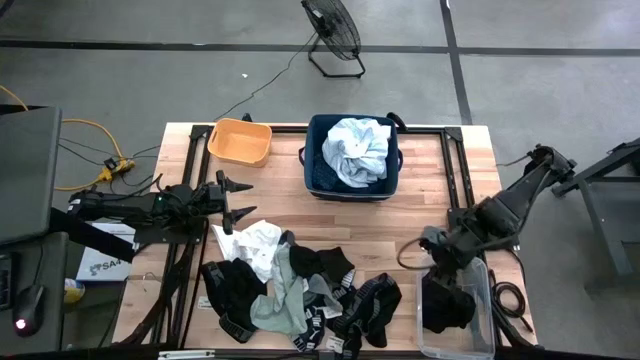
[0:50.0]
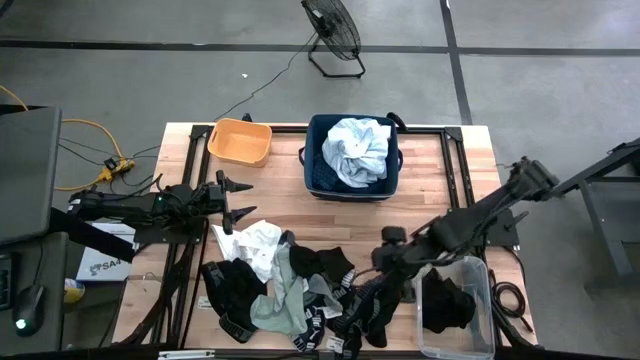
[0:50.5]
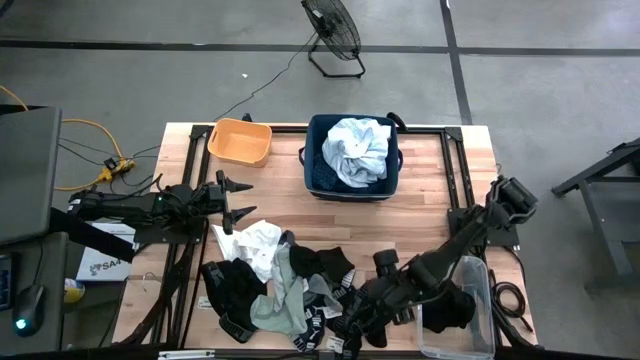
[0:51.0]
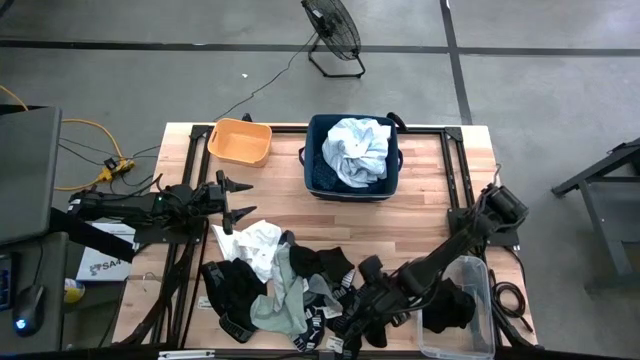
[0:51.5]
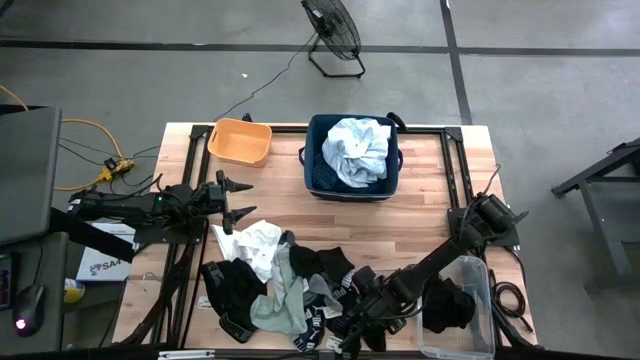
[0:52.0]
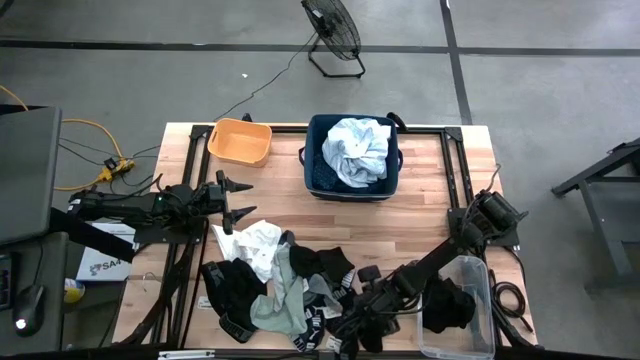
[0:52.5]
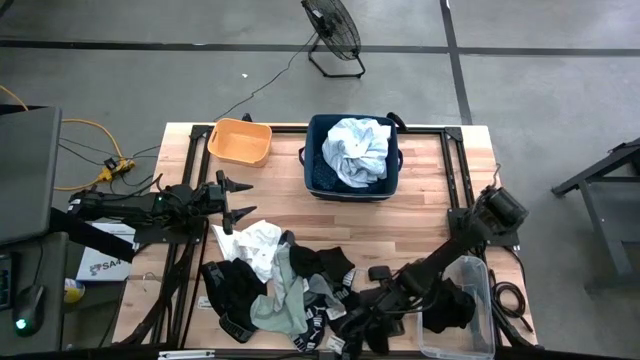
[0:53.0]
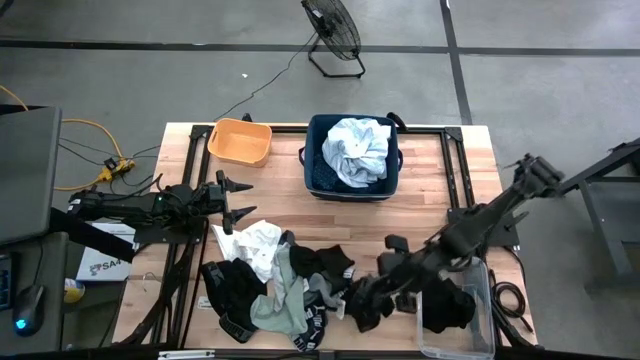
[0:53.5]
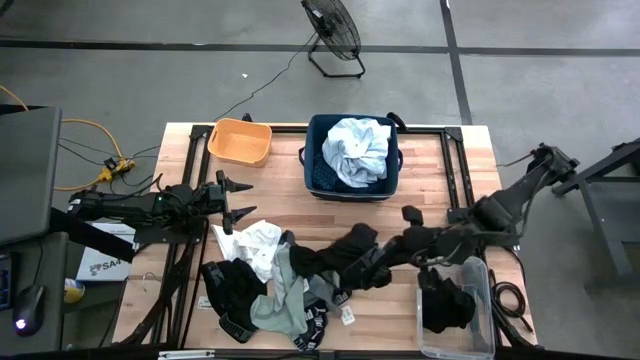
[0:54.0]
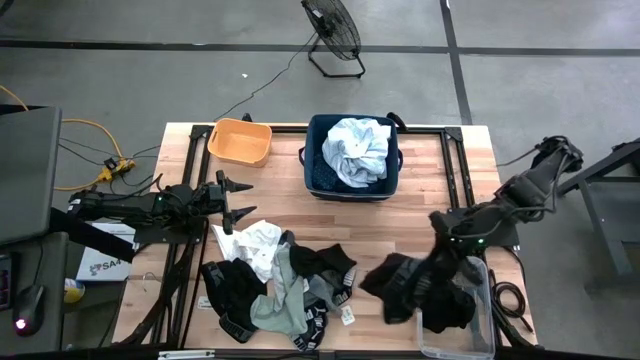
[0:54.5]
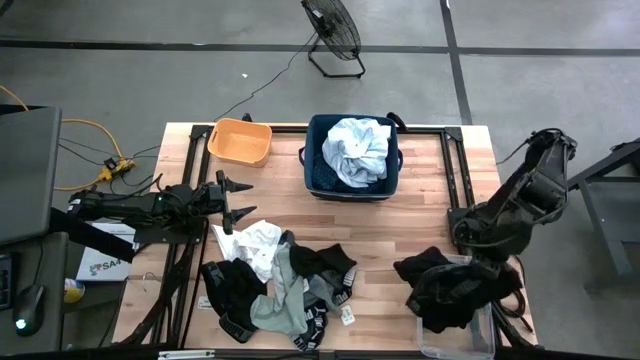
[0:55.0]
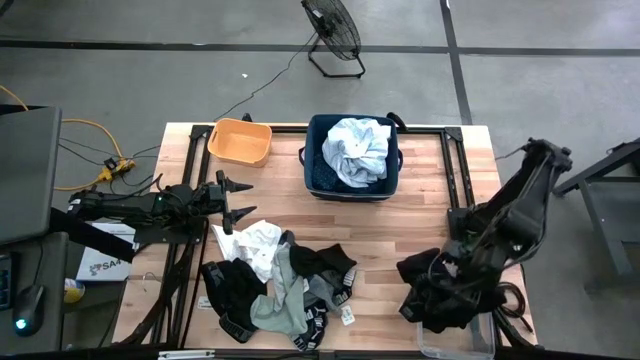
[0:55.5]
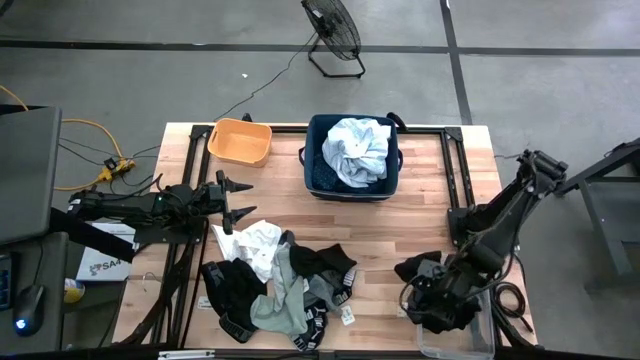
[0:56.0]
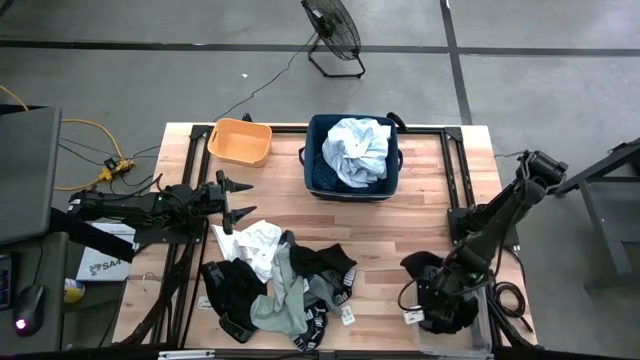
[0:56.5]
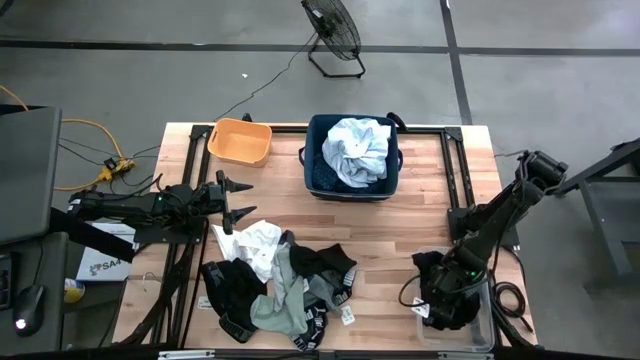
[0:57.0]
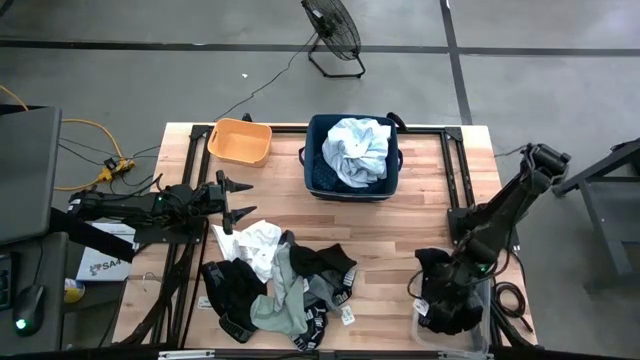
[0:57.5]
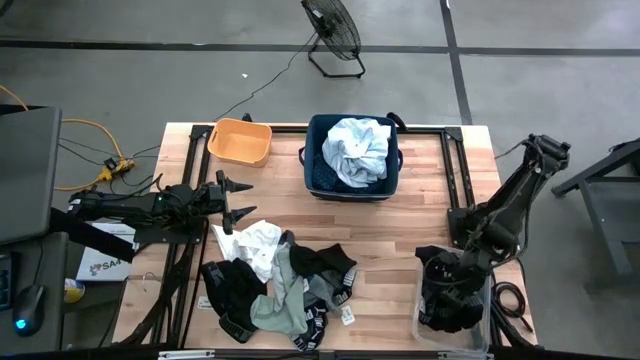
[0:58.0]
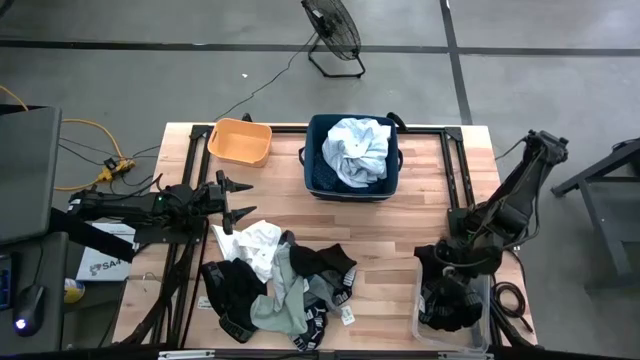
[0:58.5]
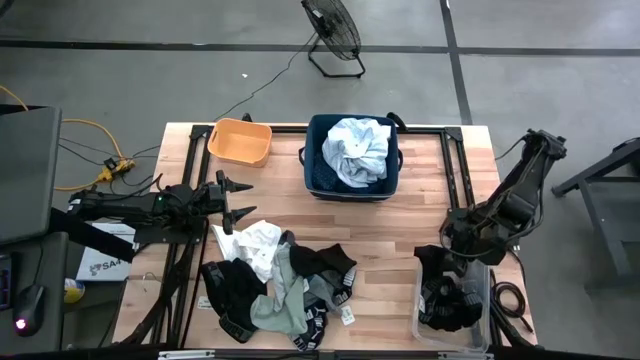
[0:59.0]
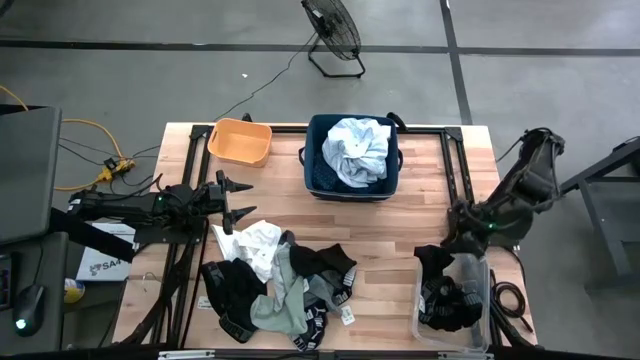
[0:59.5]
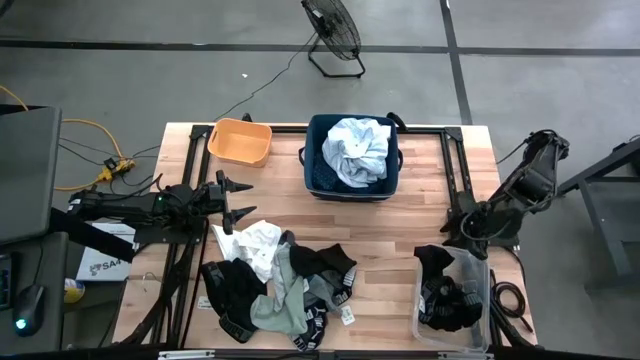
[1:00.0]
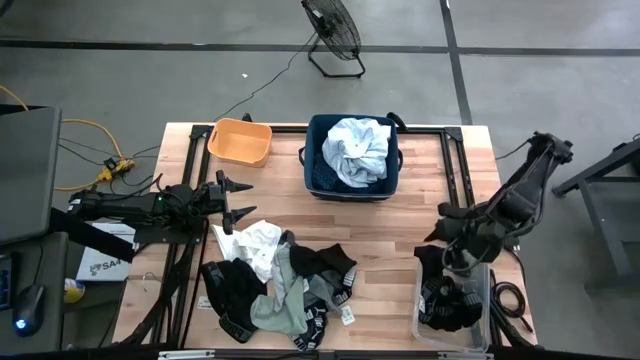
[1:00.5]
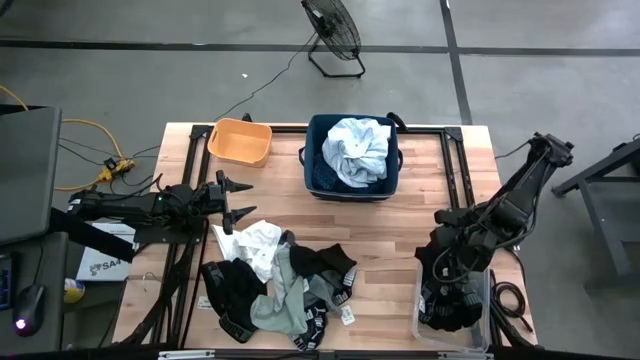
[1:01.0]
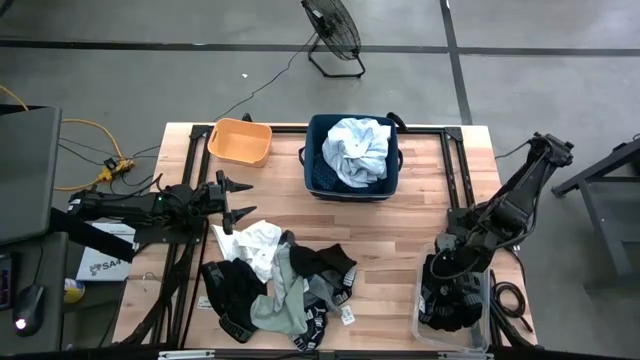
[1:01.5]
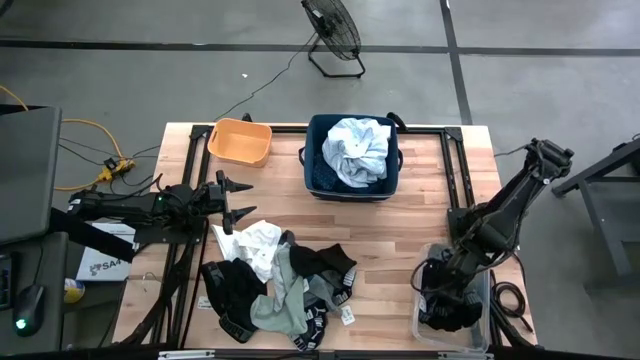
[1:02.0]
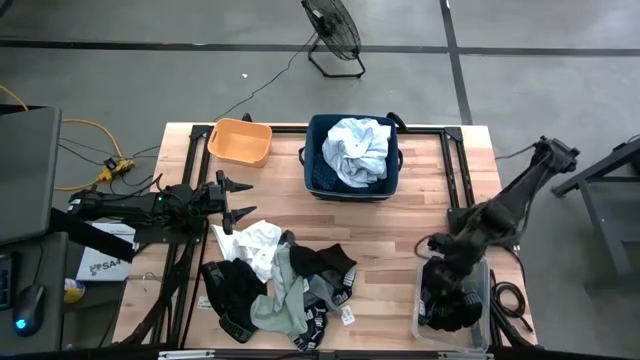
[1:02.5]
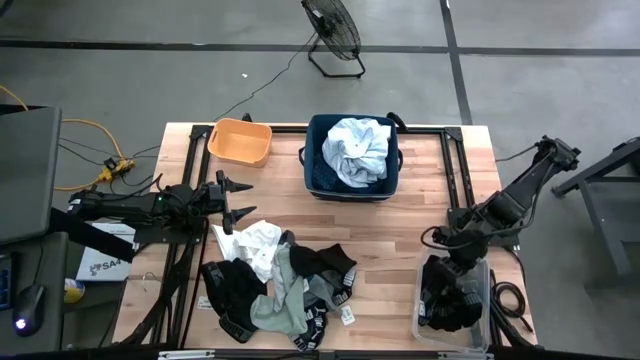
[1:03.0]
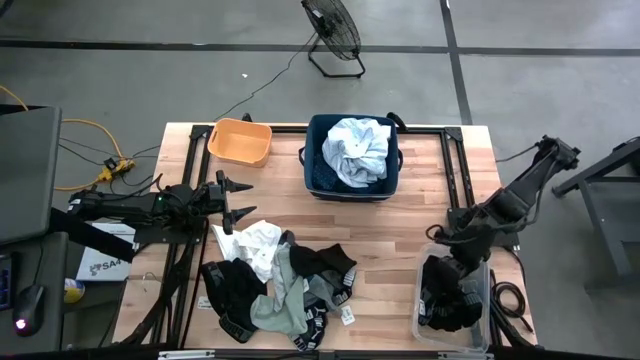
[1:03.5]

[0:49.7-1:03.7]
Task: Pick & Place Cloths
Put the black boxer shorts into the transparent bin
